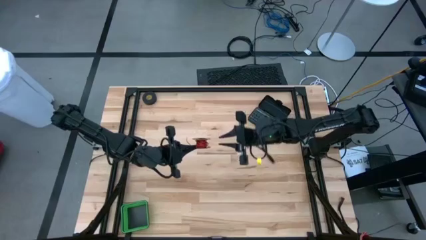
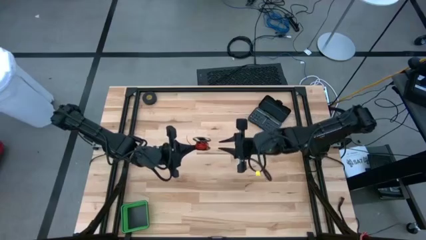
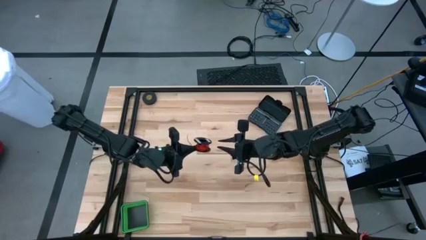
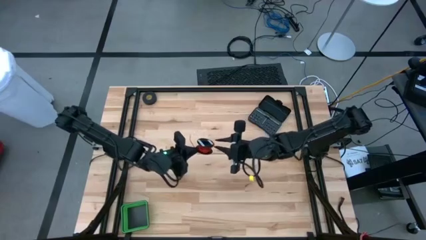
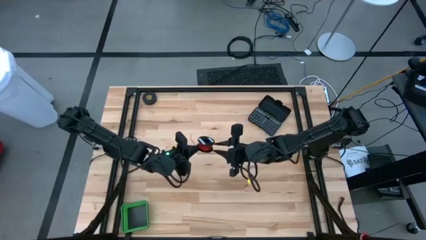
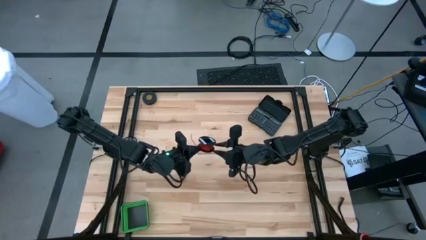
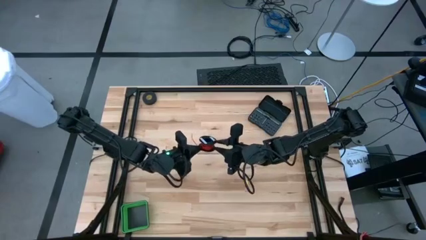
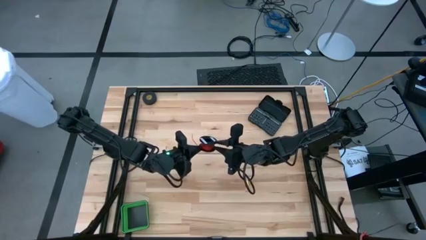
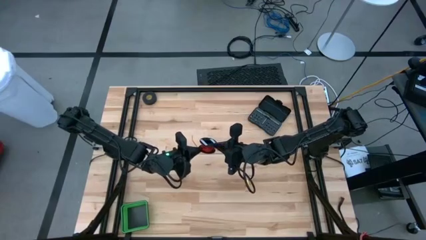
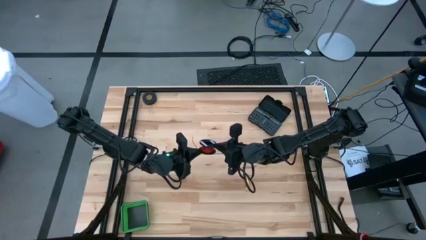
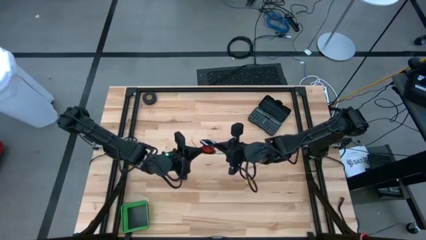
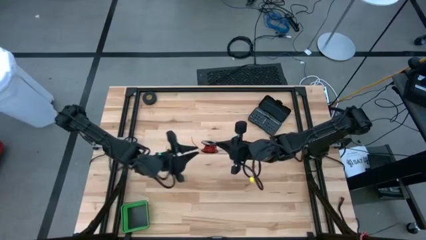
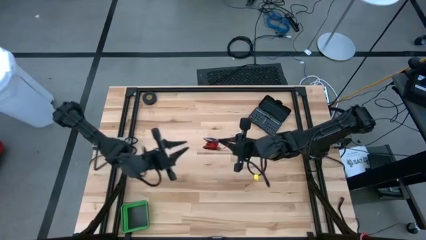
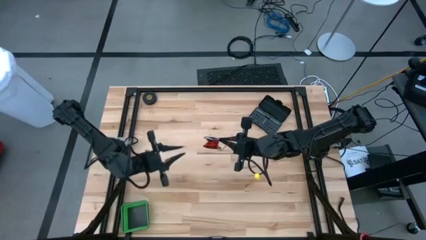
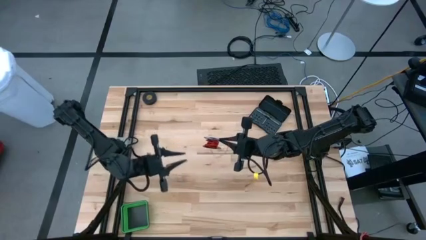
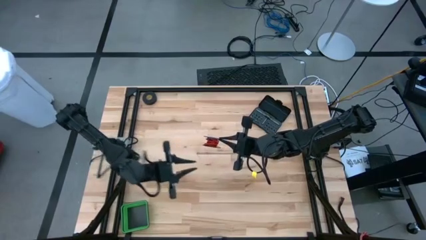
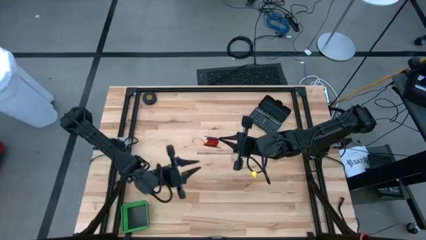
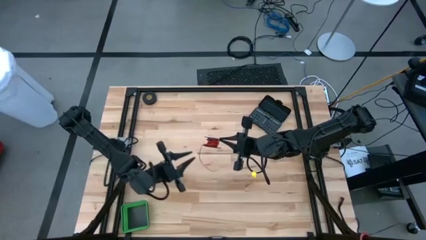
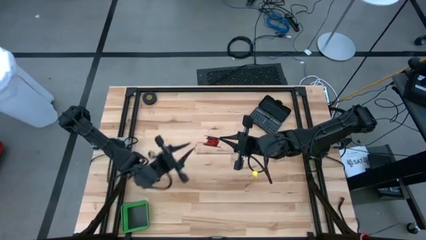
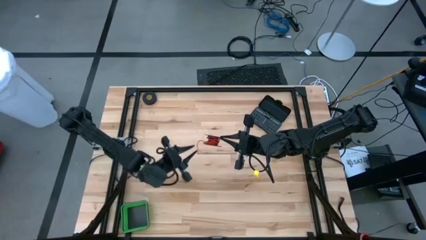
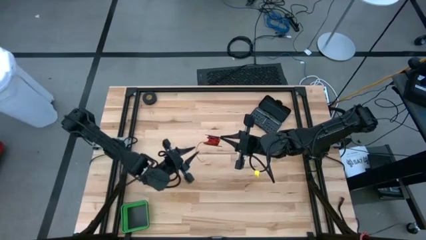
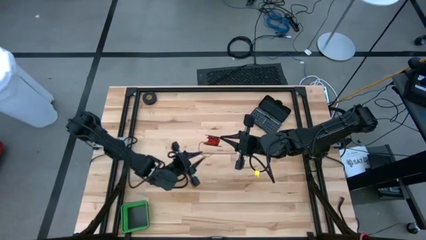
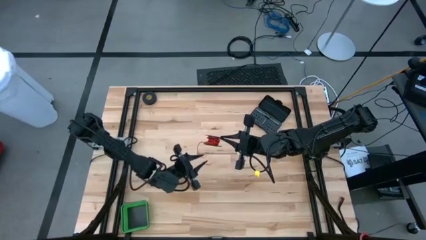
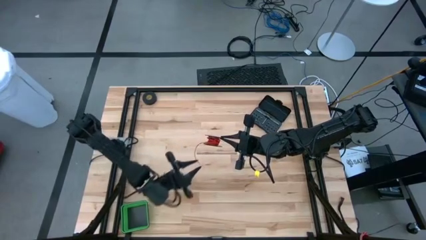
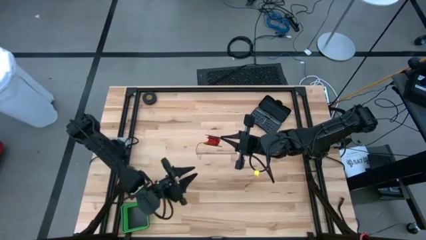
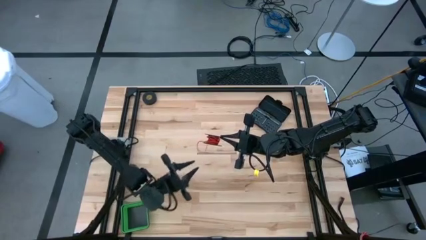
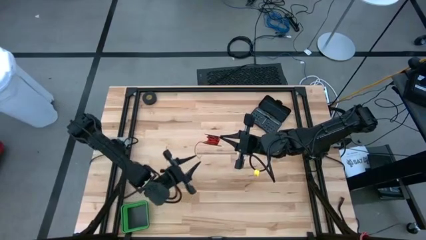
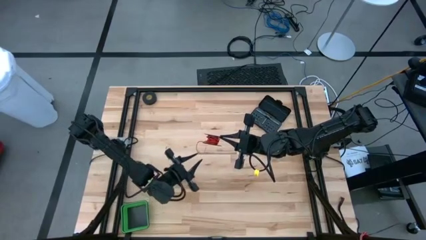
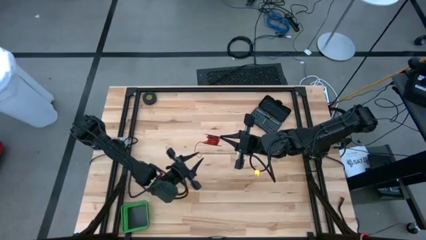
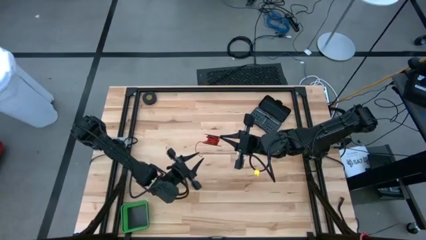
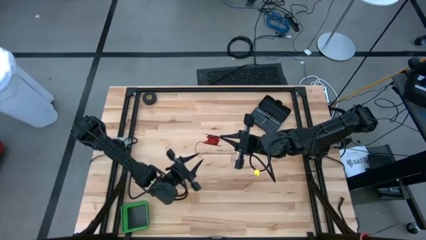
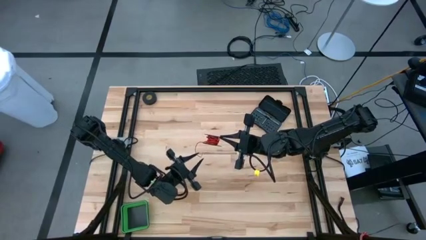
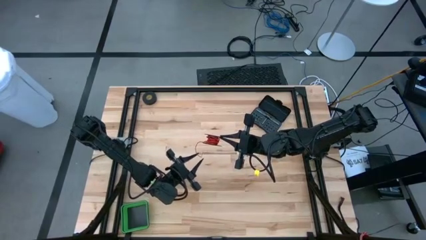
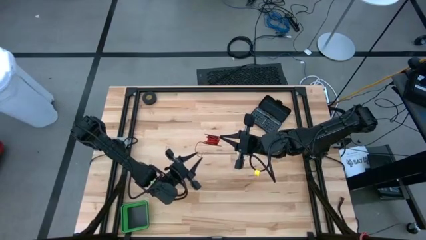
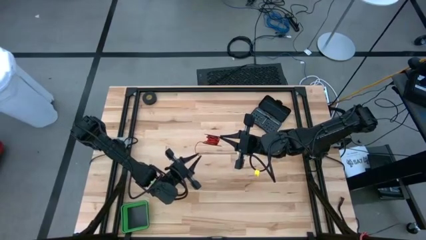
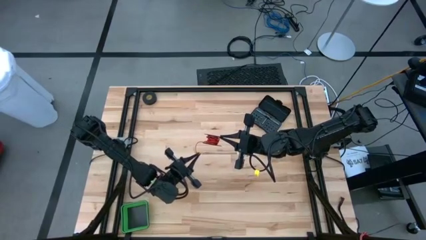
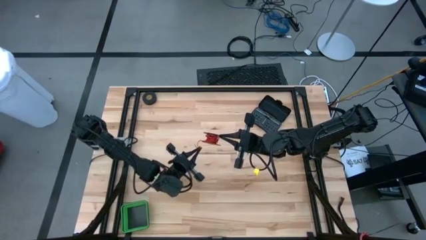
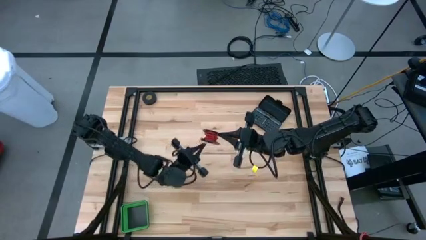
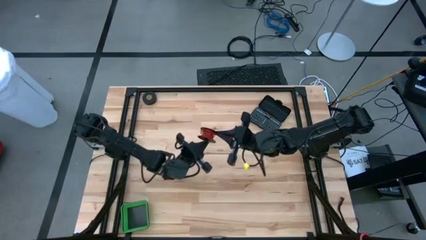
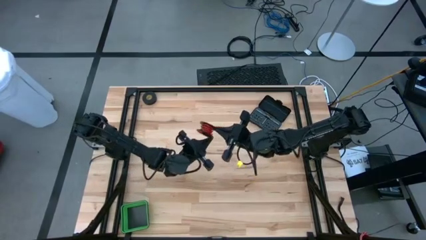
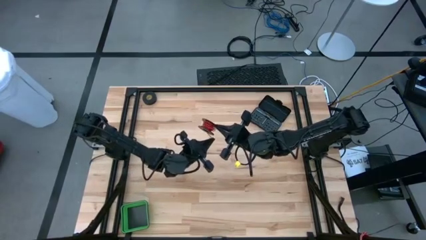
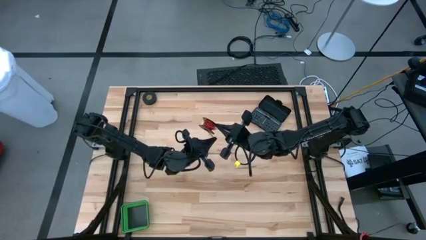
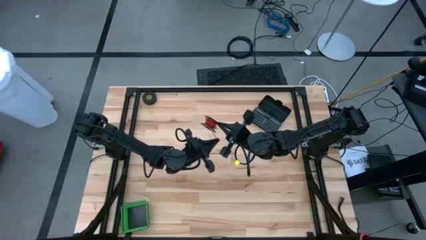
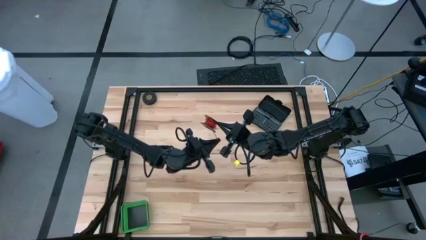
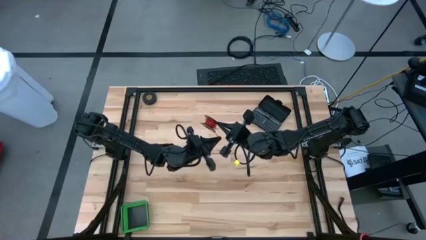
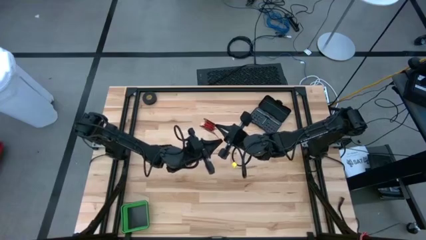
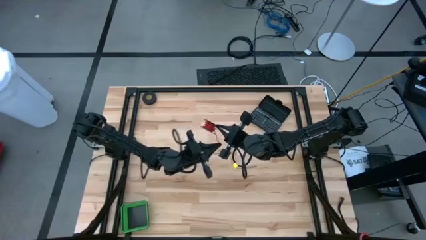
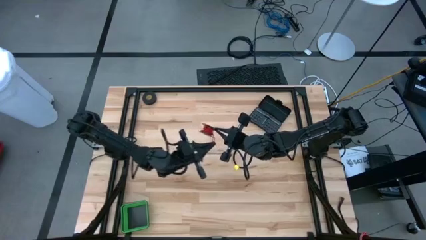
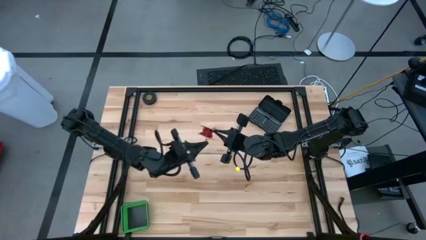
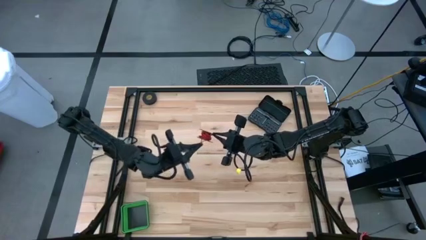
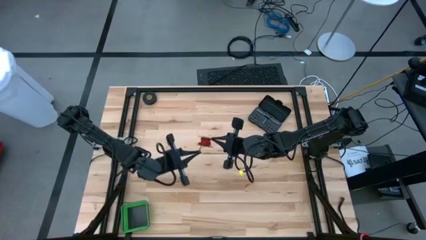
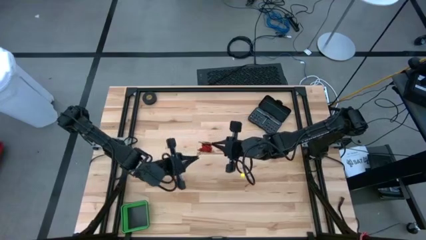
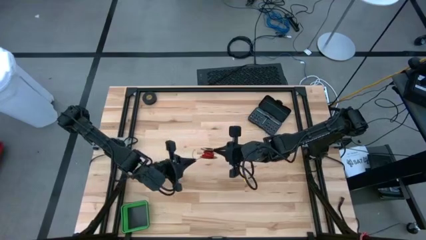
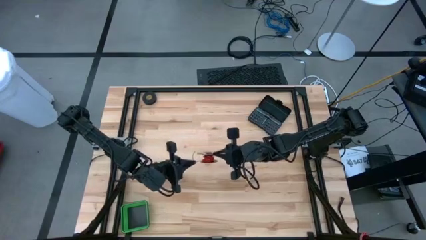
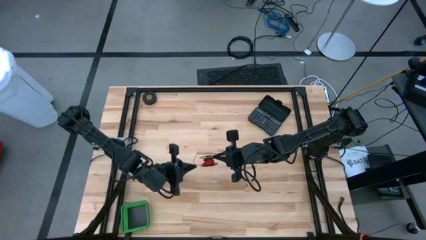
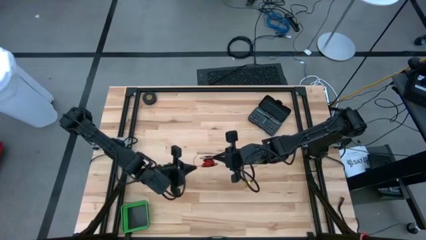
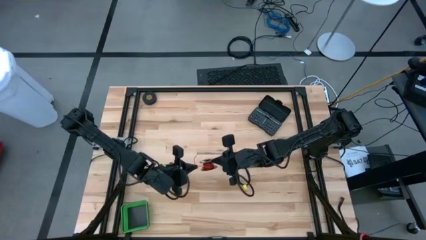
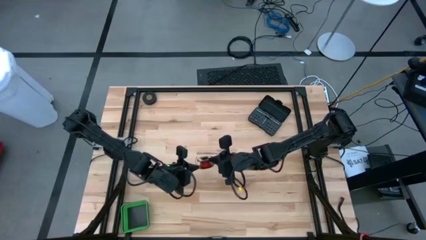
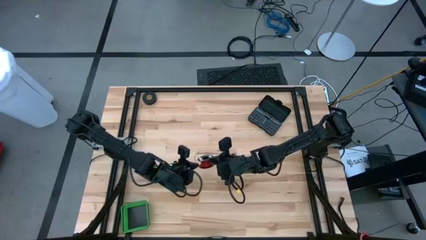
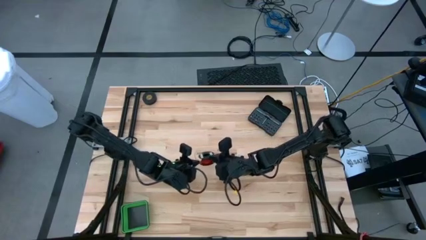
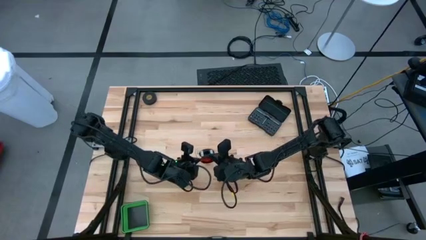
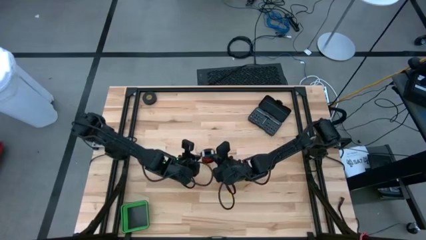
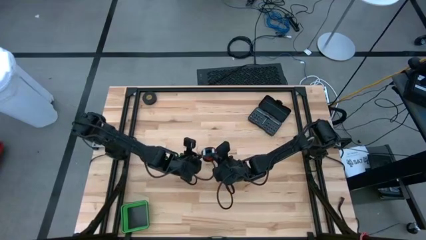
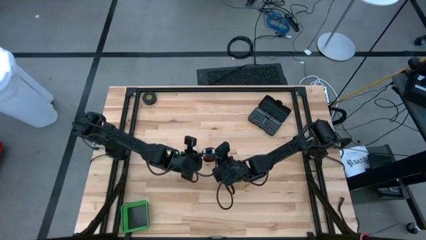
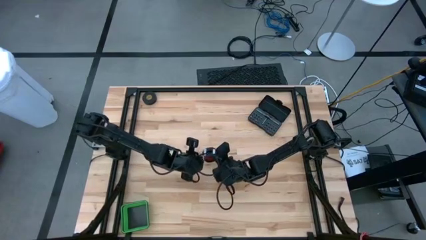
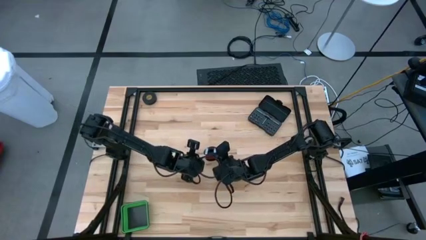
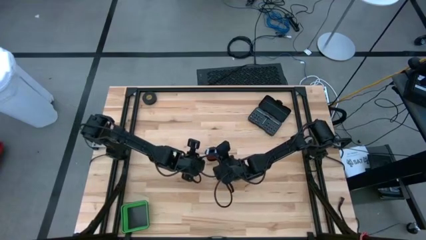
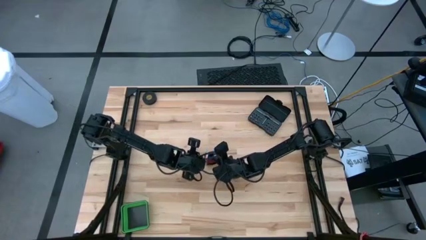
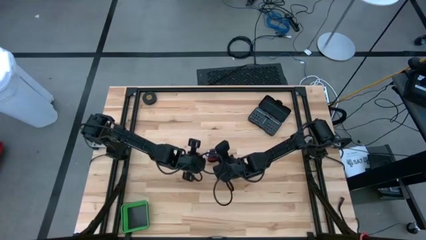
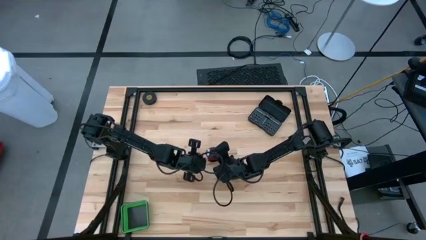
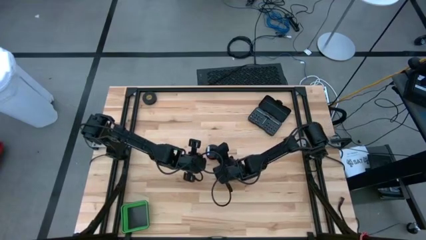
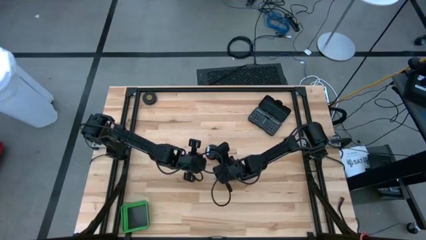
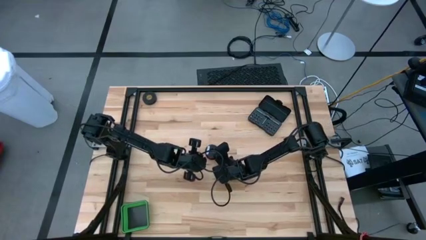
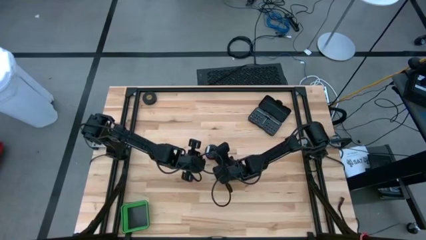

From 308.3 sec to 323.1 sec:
Task: Coil cords
Coil the red wire into the spool

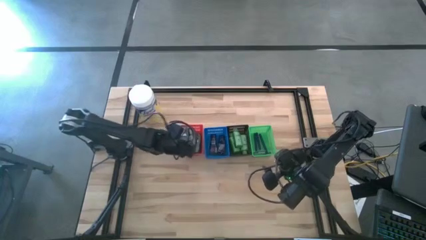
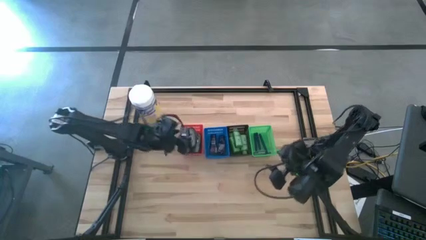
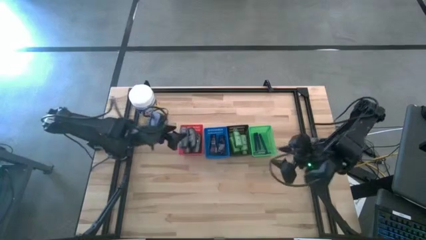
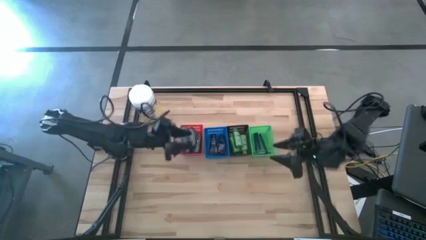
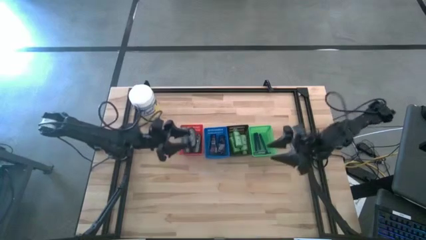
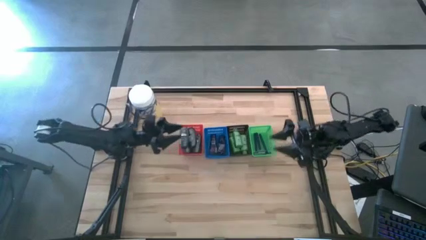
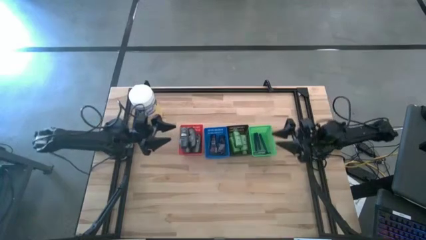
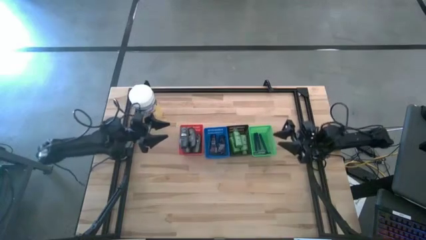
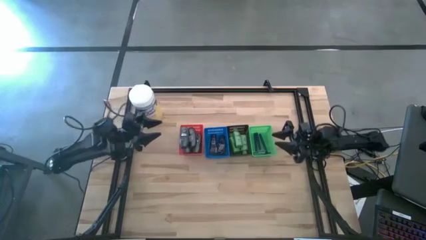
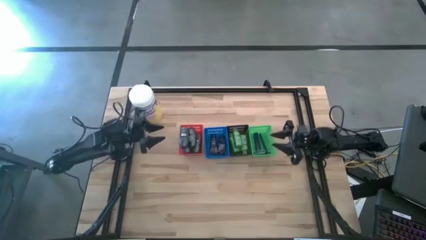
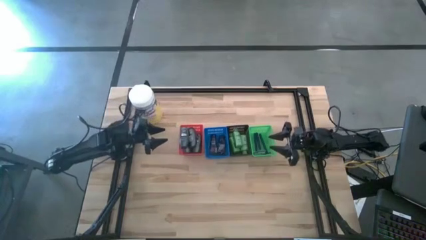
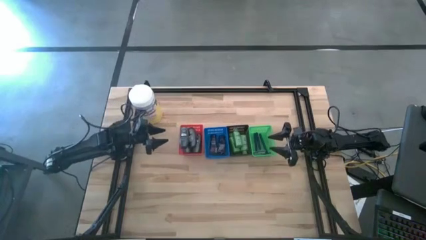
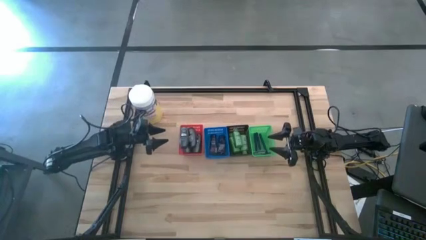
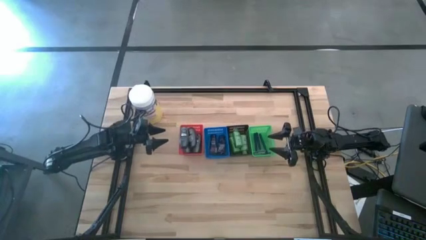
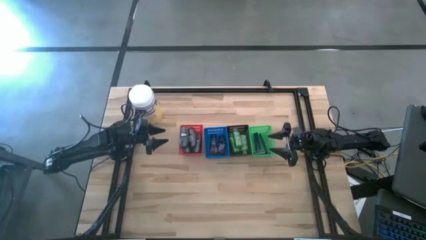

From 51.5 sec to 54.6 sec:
Task: Pick & Place Travel size toiletries
Return to Home Position
